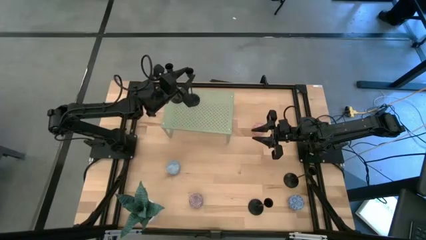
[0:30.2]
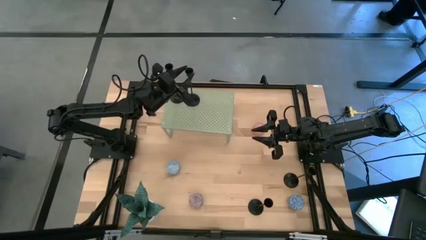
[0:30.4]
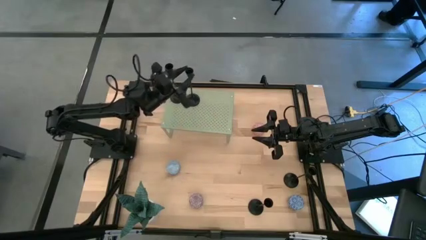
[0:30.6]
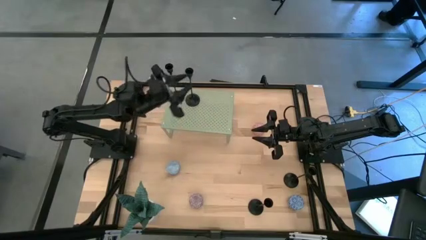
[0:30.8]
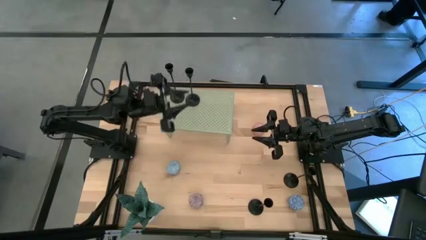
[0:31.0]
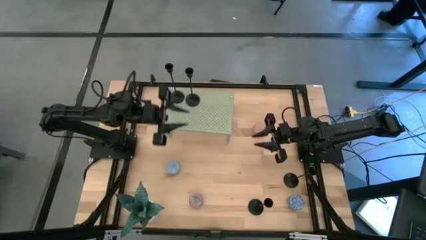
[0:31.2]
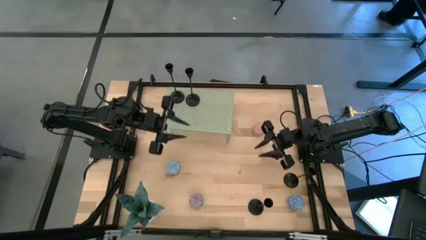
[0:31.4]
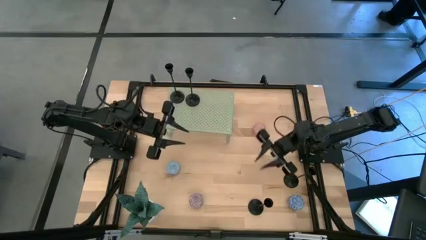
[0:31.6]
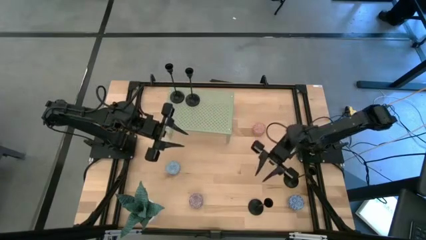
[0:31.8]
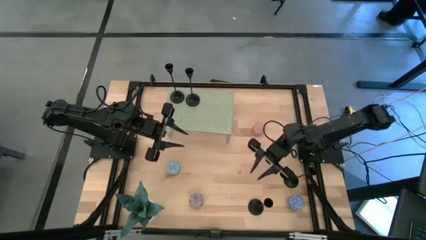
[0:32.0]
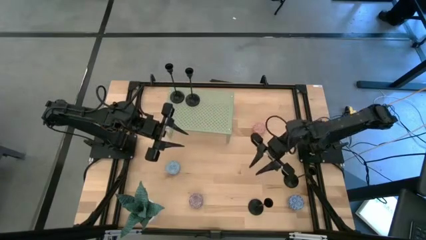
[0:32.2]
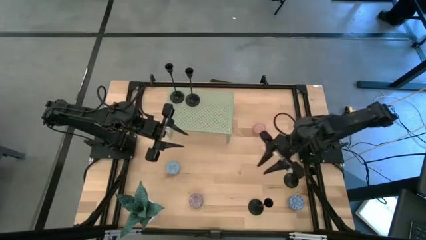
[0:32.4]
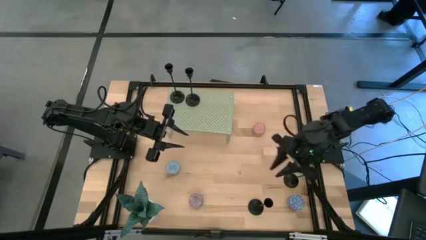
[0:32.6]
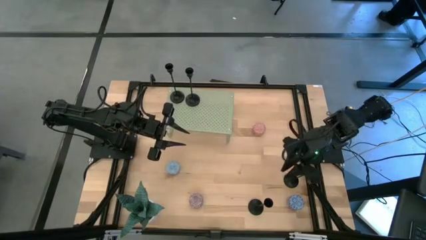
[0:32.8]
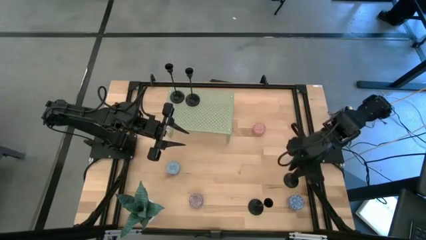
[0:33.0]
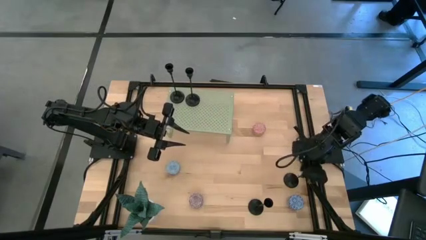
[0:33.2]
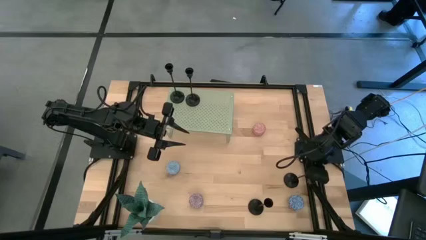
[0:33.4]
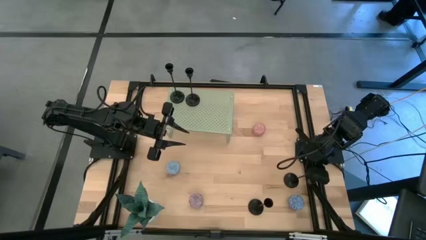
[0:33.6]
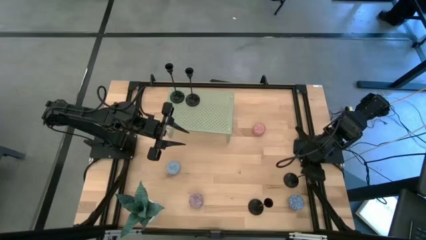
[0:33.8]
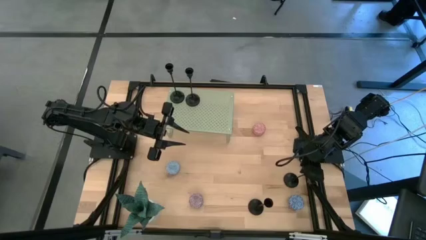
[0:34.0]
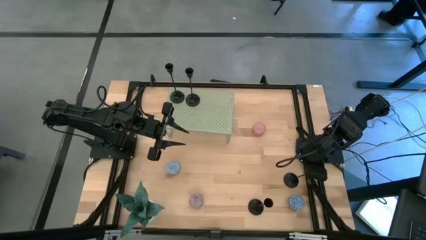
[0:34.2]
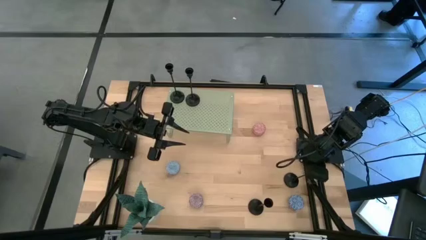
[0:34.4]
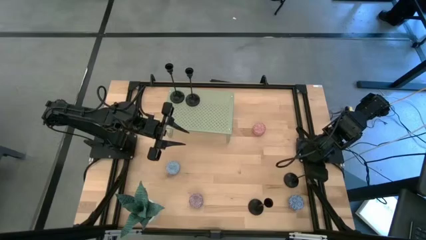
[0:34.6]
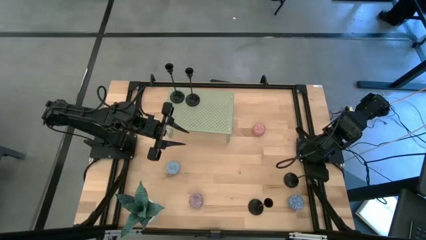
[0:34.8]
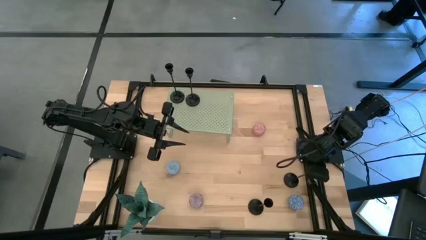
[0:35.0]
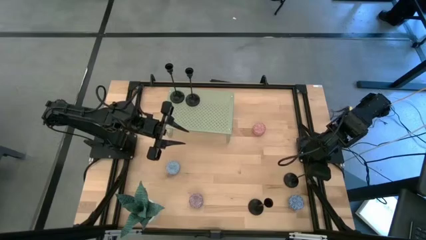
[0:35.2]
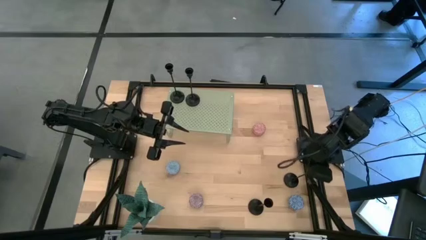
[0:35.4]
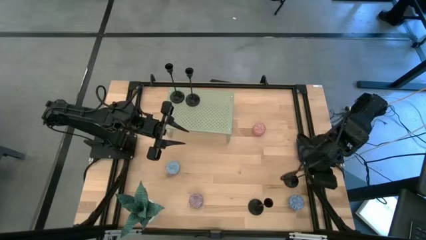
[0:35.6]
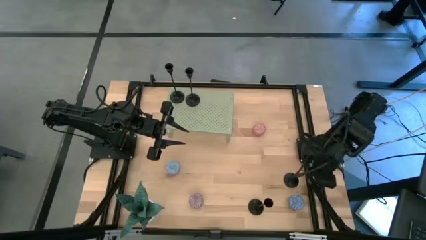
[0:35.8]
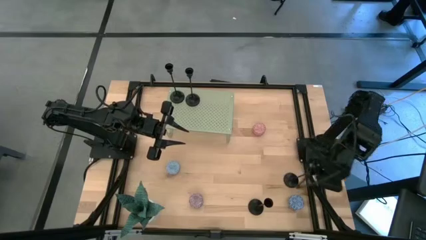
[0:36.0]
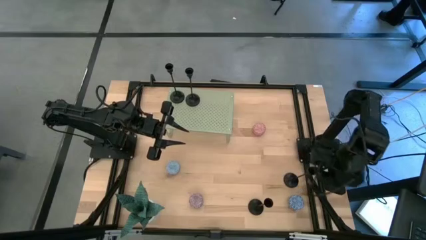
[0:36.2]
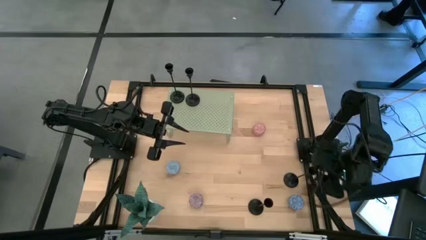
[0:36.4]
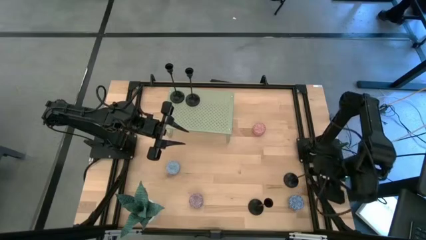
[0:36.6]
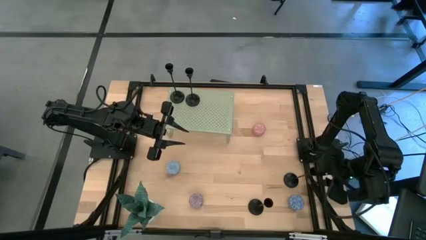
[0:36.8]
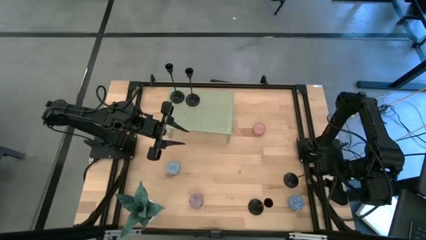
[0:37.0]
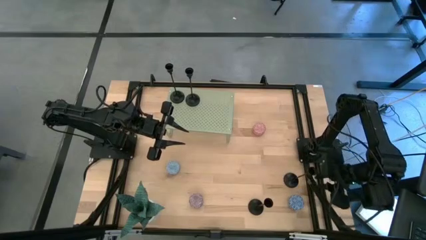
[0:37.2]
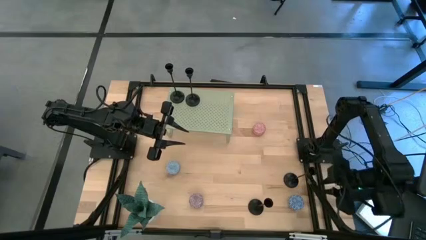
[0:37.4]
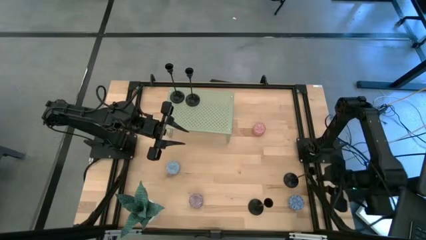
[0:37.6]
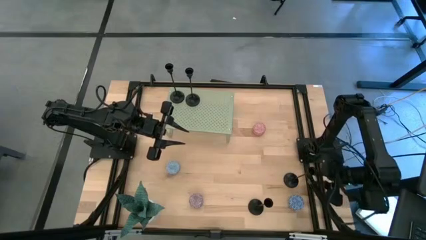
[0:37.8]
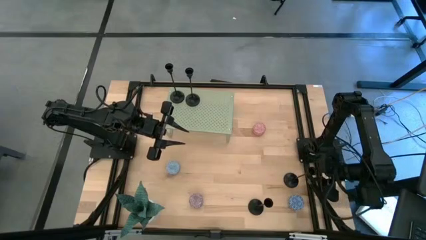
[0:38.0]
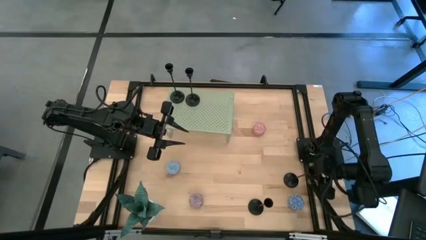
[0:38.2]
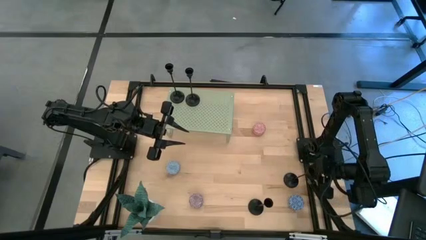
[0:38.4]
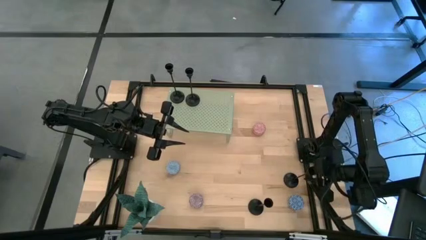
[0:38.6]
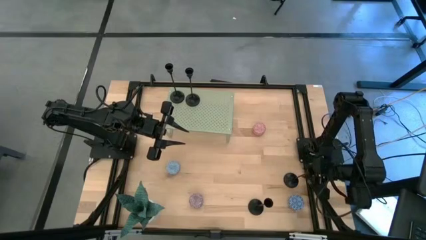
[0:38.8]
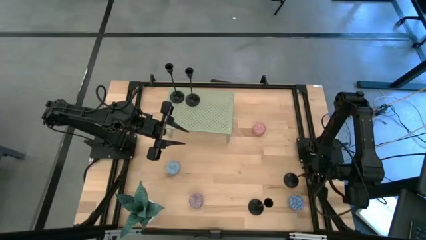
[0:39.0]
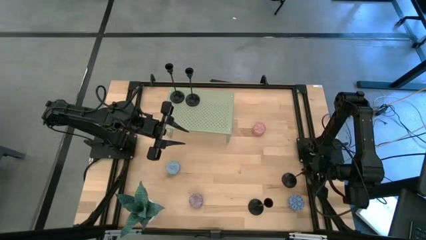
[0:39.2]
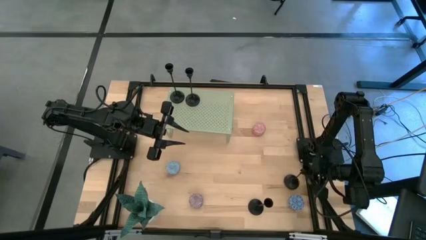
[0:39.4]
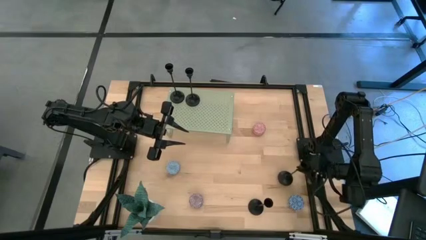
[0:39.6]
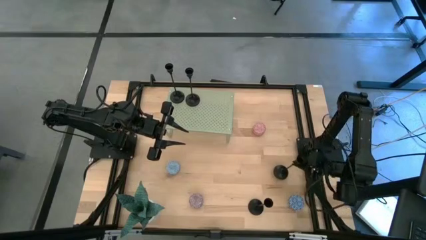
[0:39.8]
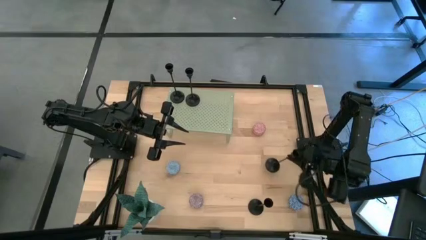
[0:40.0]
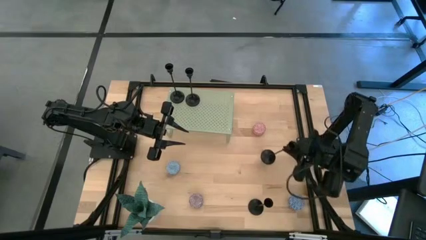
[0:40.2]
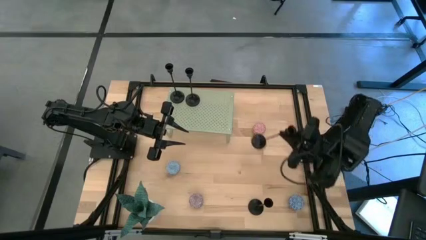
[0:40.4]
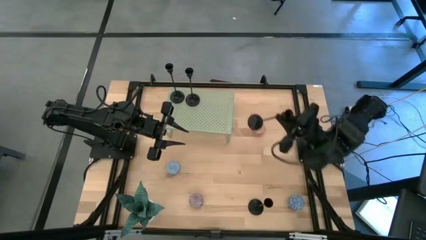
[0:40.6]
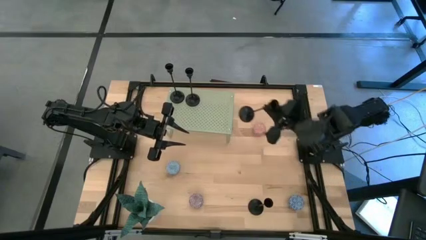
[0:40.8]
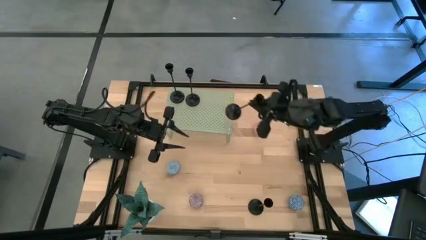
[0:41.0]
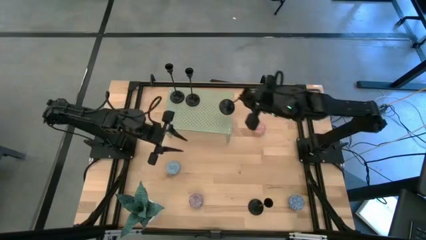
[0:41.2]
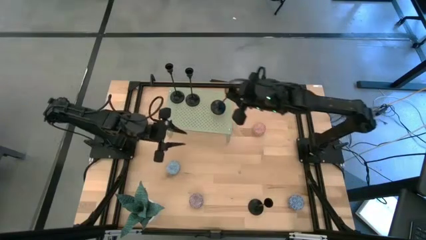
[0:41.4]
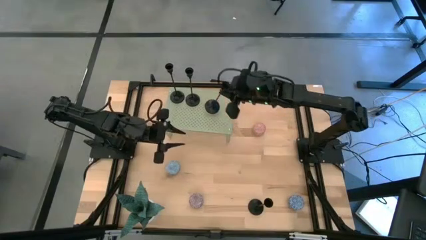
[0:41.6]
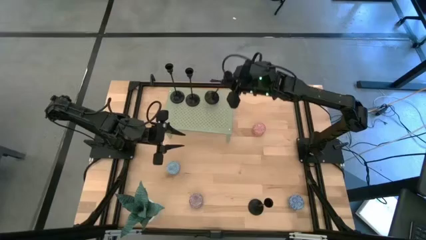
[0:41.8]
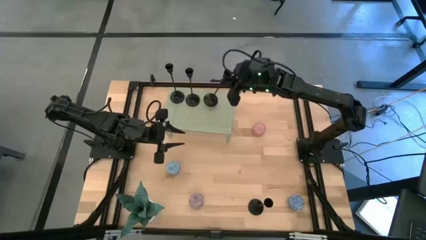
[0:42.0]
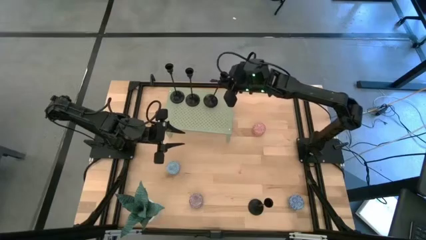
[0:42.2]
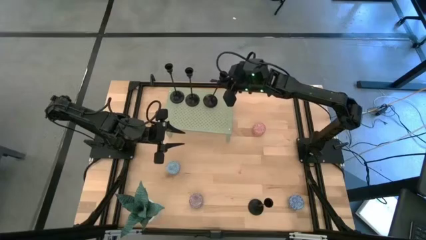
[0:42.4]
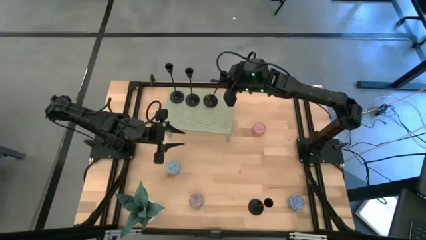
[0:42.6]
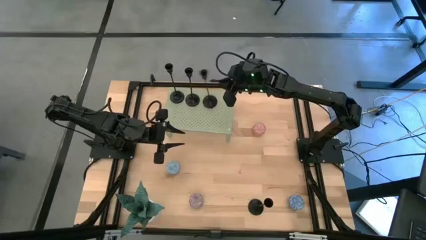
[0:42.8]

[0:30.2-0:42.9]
Task: Pick & Place candle stick holders
Put the top black candle holder on the shelf aligned with the other black candle holders
